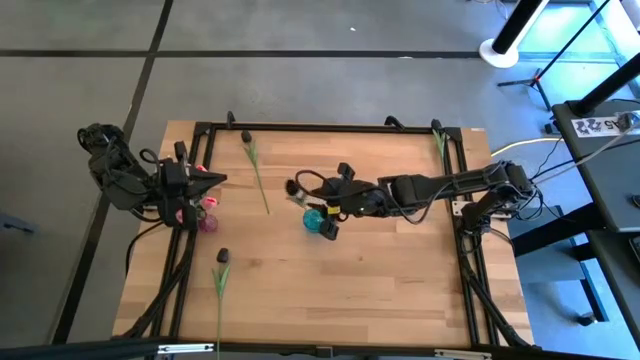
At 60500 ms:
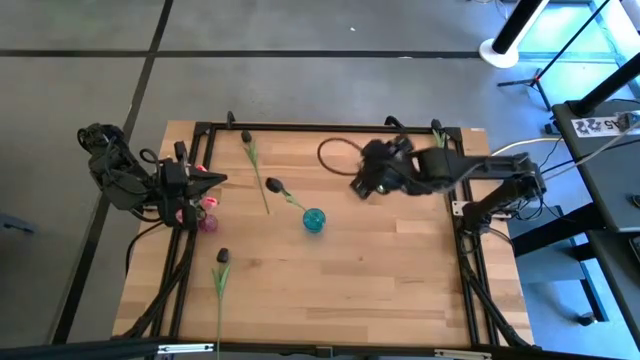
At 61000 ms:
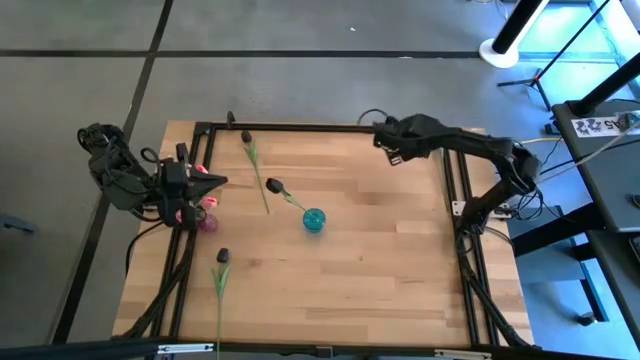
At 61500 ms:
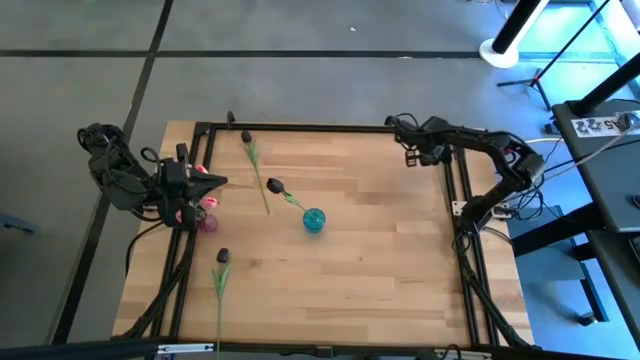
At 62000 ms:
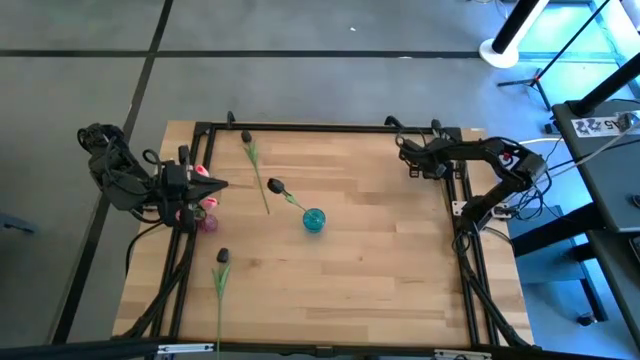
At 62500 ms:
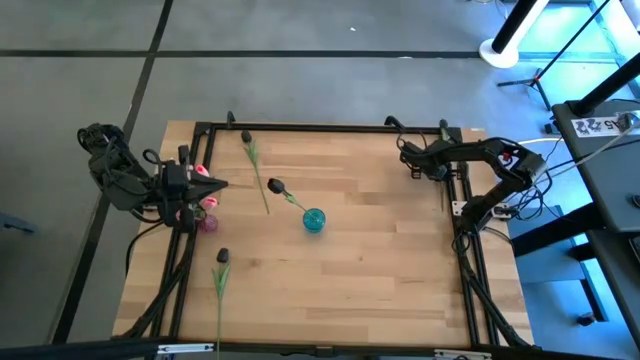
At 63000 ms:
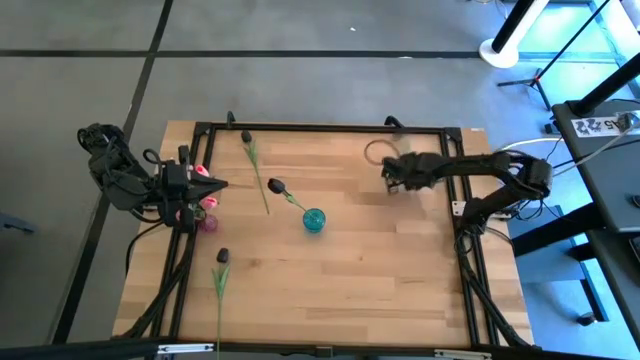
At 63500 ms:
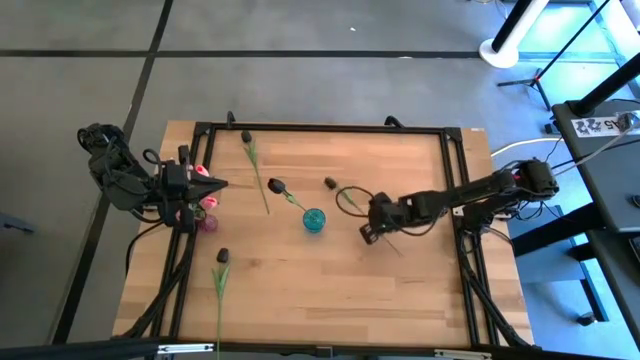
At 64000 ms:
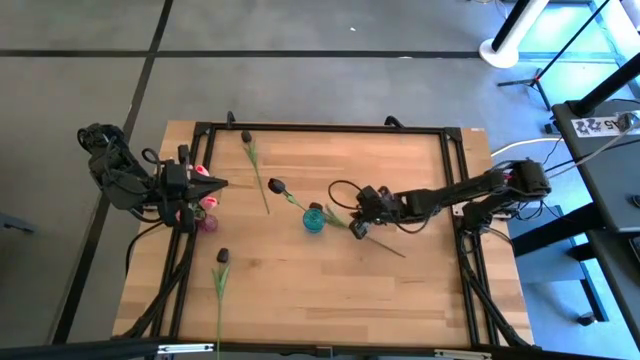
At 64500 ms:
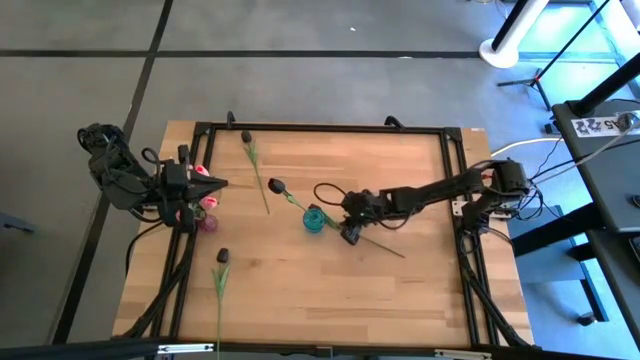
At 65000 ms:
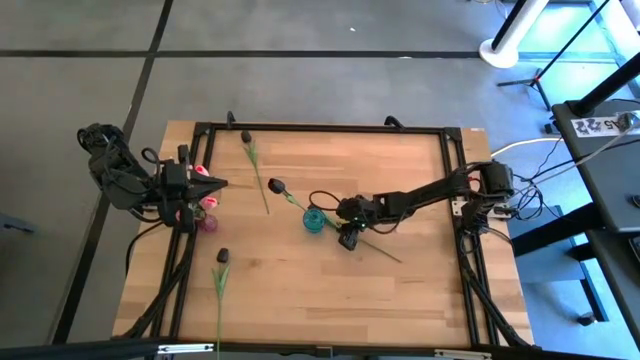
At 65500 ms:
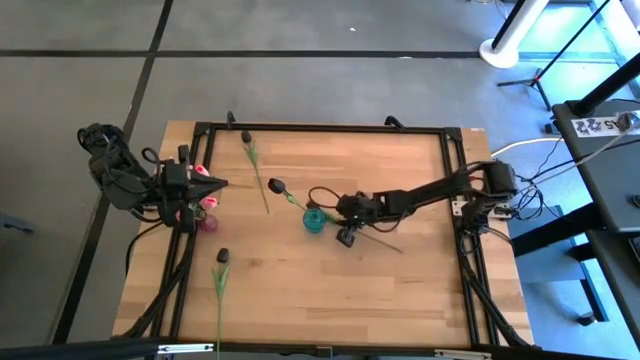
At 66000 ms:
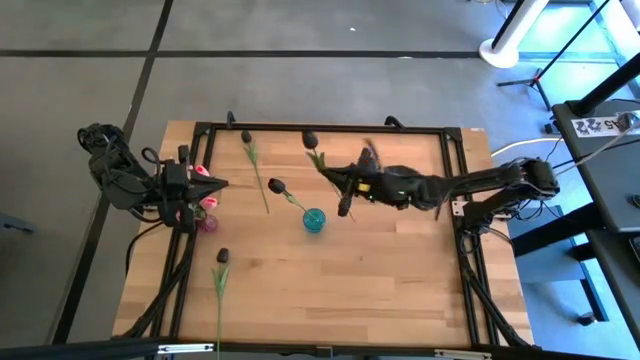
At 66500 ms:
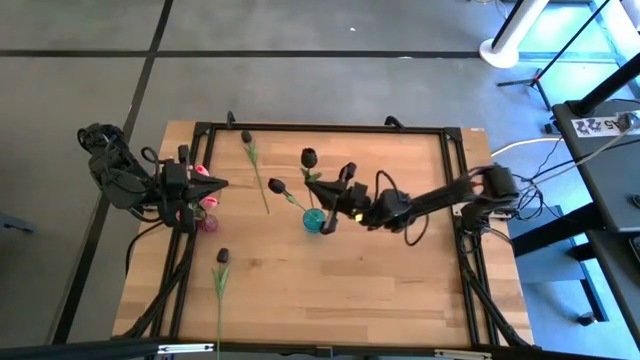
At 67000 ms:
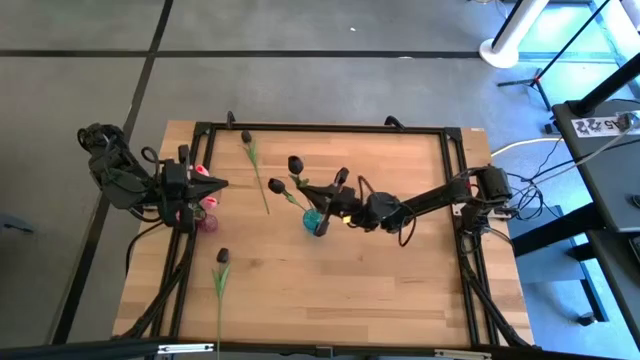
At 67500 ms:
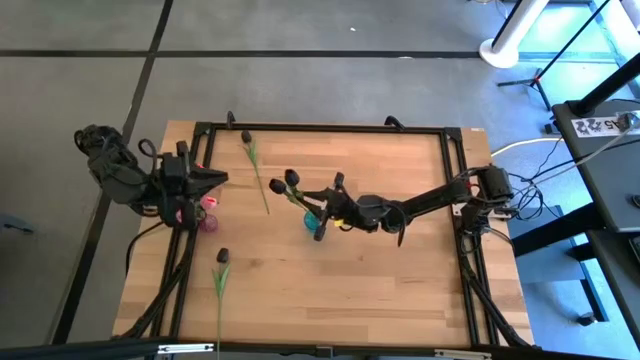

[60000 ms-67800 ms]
Task: Sort flowers into vase by color
Put the top right black tulip into the blue vase

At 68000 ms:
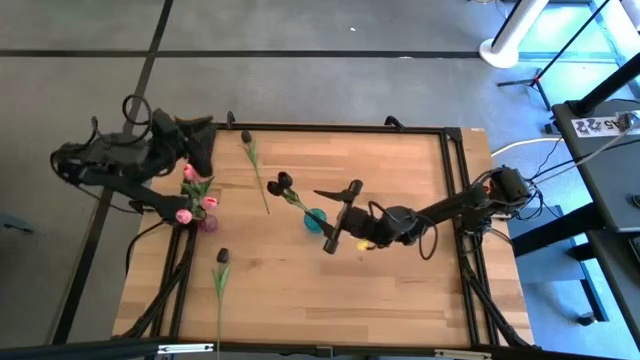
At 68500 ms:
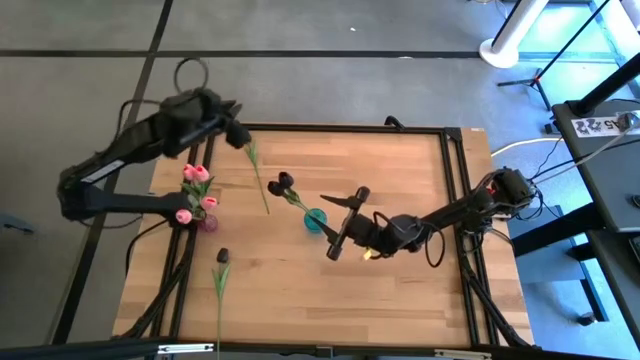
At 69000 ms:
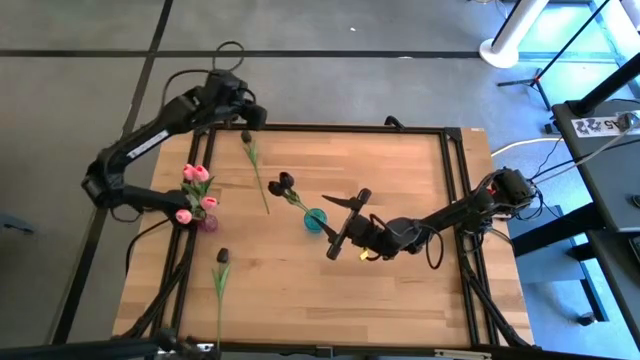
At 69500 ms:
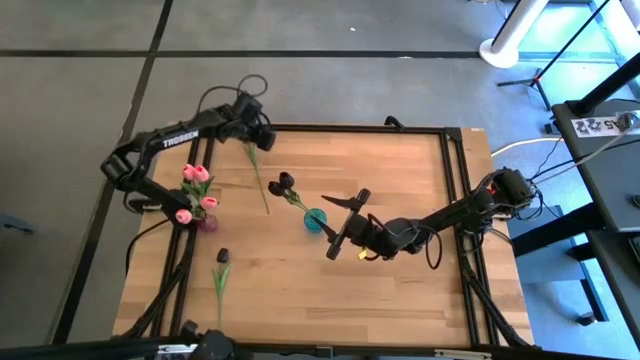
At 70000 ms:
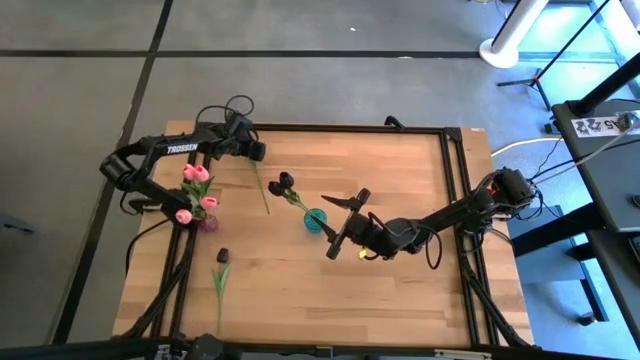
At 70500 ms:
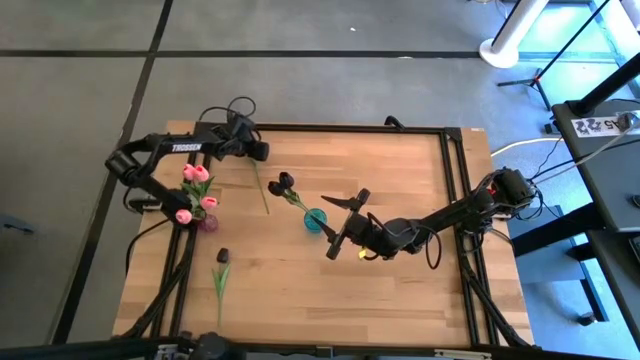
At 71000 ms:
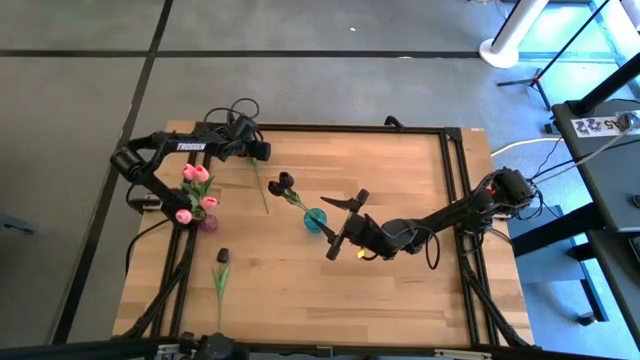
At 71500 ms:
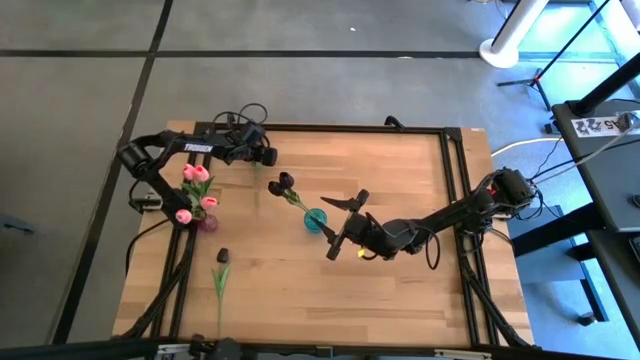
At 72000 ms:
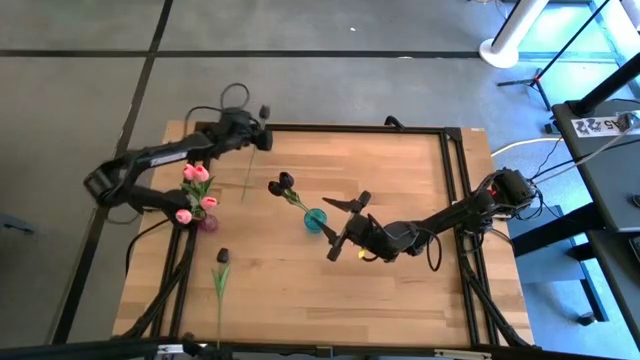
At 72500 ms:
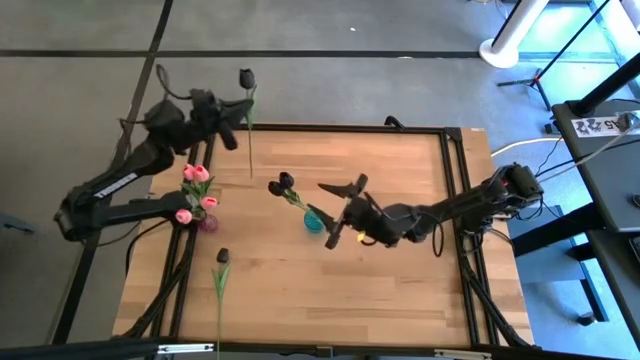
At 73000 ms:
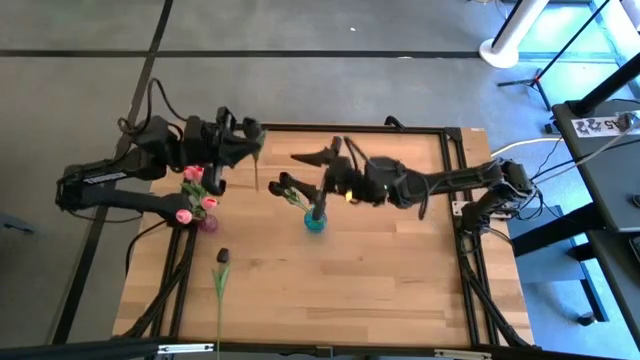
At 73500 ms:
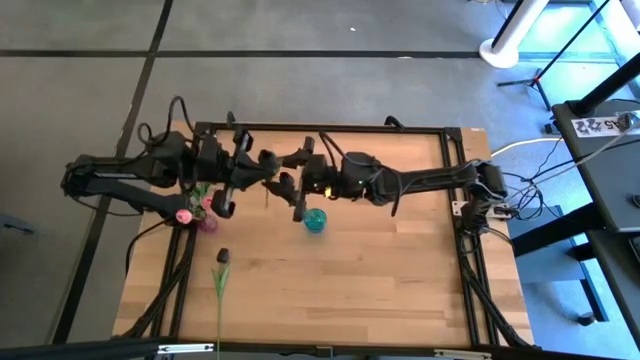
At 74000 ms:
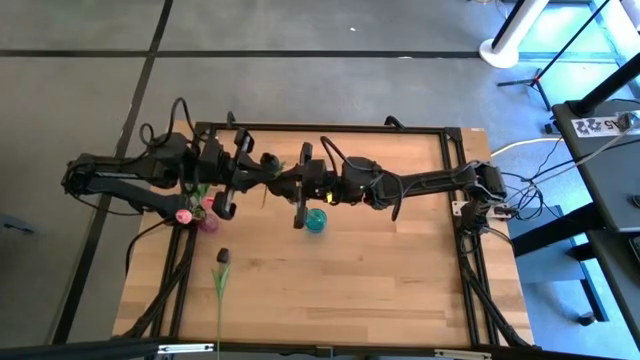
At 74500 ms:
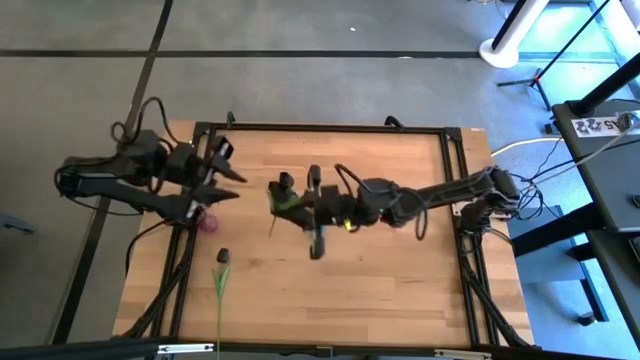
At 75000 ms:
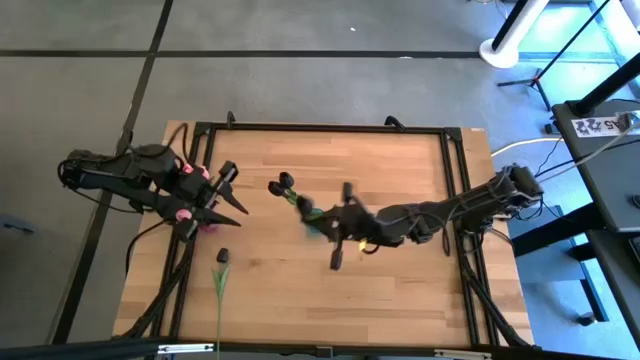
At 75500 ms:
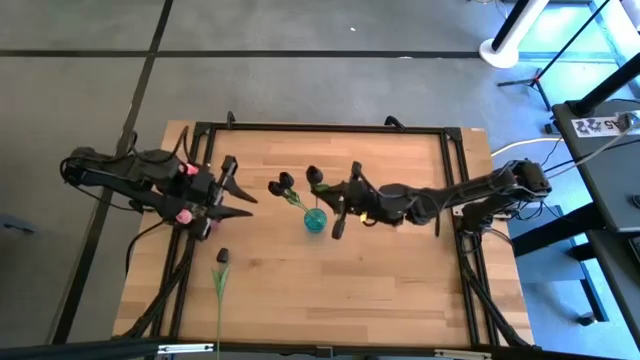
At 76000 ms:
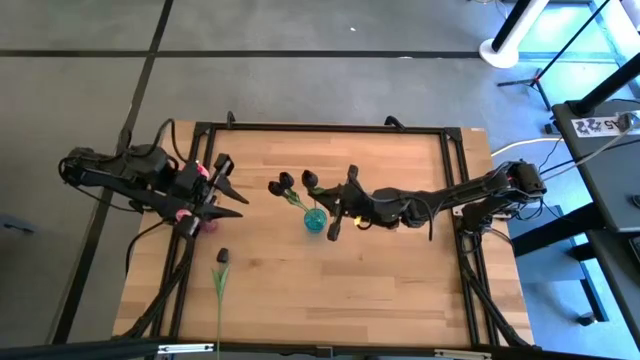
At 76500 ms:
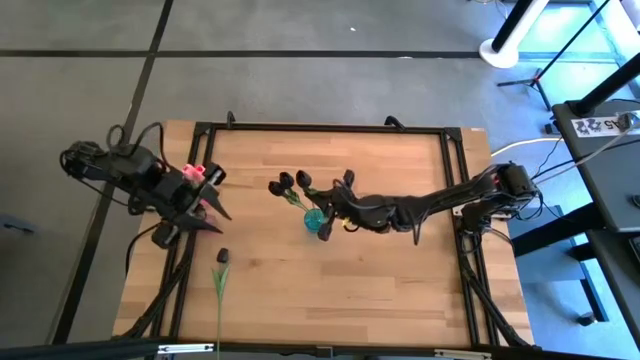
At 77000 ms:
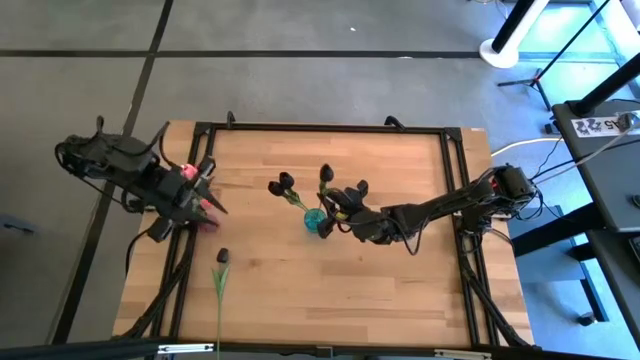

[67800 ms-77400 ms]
Put the top black tulip into the blue vase

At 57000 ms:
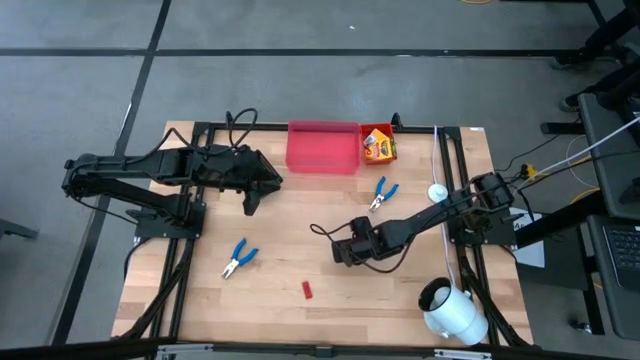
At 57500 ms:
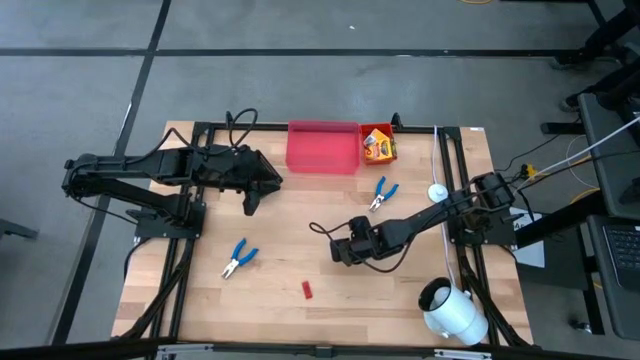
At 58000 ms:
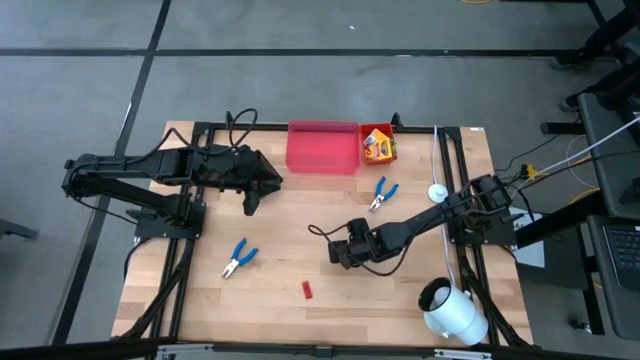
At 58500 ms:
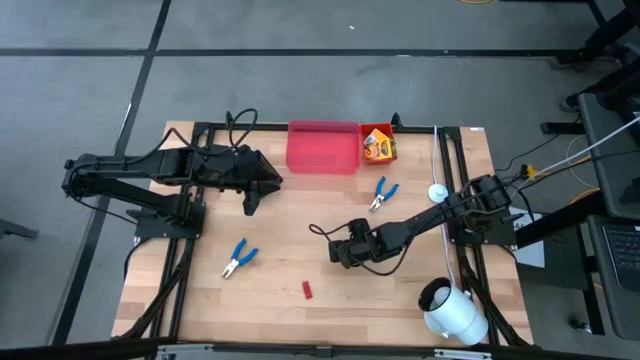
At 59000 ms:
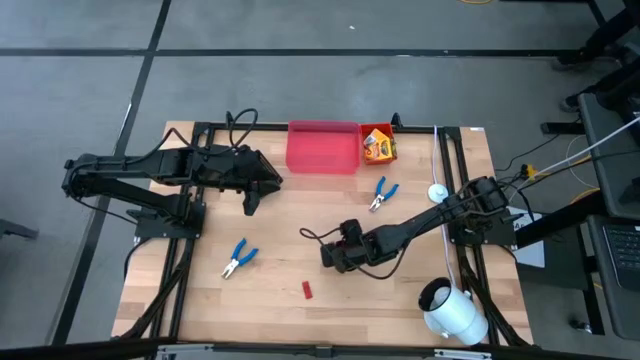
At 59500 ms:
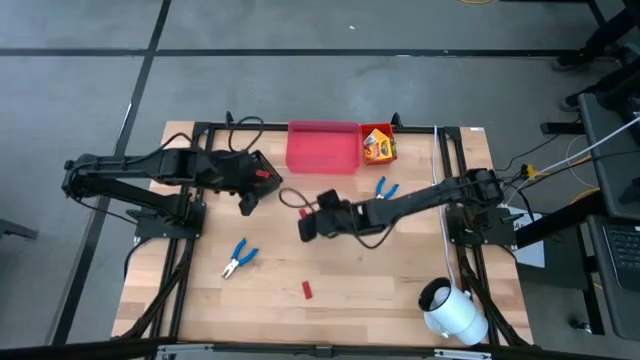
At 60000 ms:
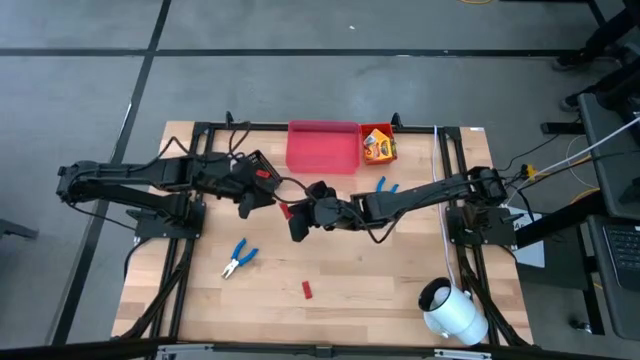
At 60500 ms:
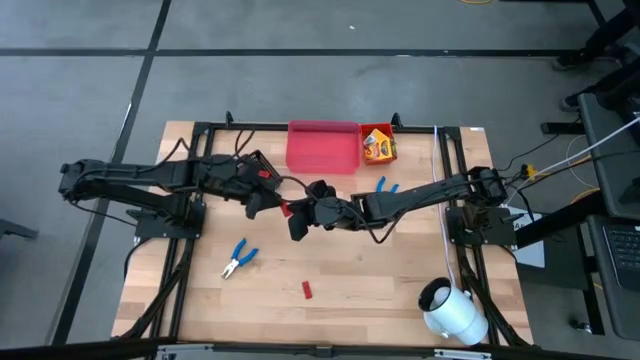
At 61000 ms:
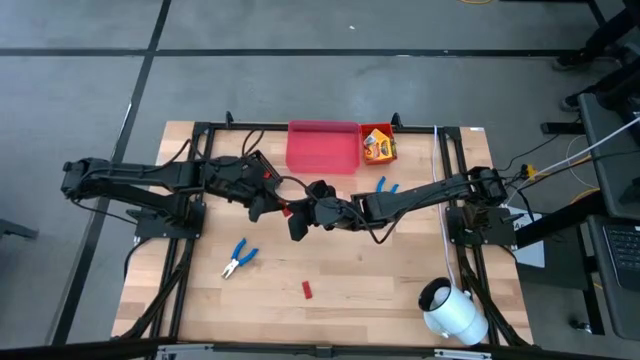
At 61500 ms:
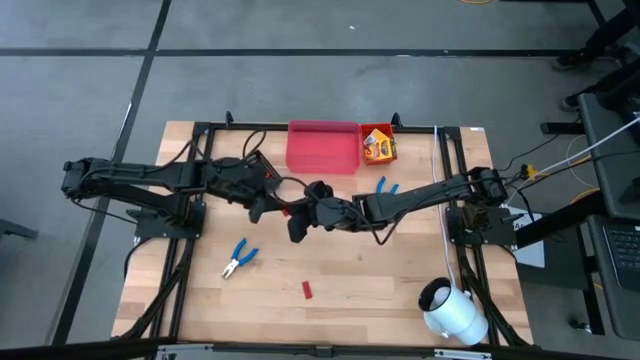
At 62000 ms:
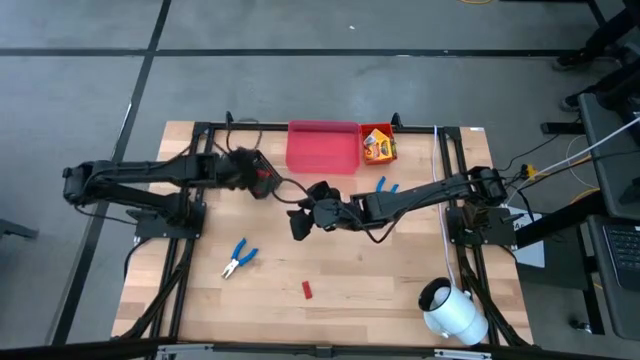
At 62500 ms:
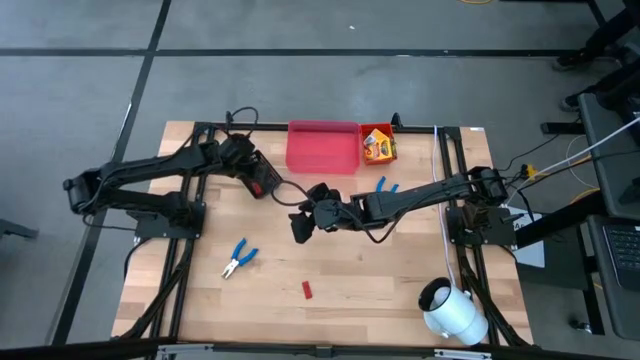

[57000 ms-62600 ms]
Task: Pick & Place School Supplies
Put the red eraser into the black bin
